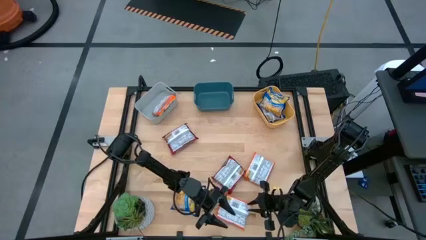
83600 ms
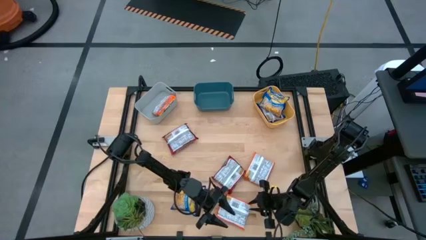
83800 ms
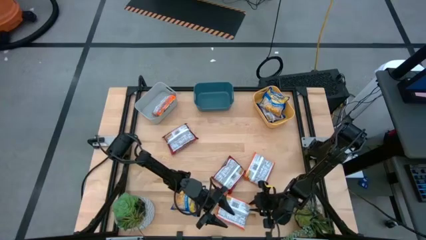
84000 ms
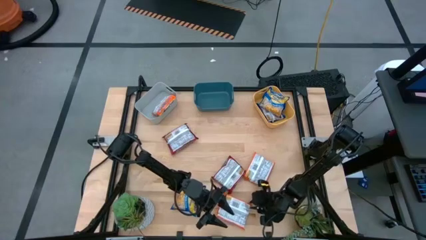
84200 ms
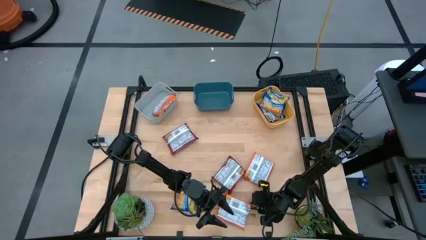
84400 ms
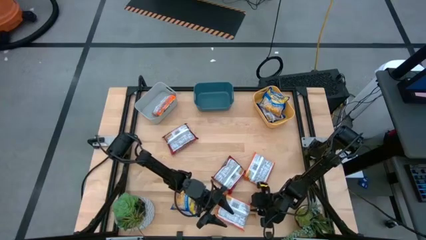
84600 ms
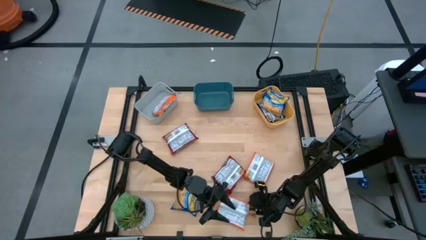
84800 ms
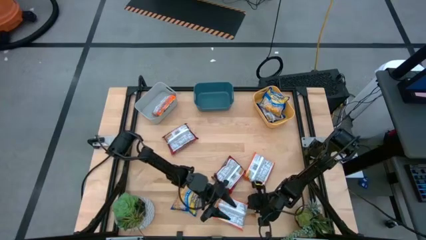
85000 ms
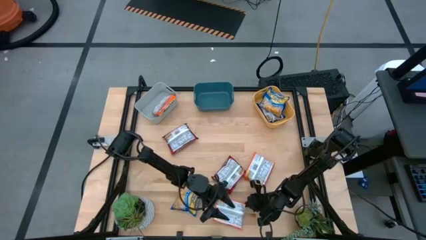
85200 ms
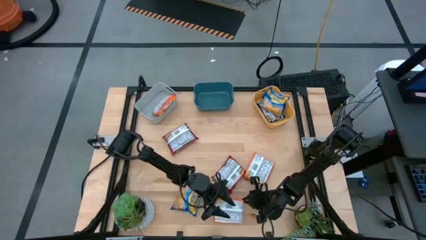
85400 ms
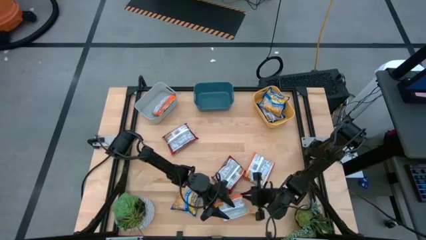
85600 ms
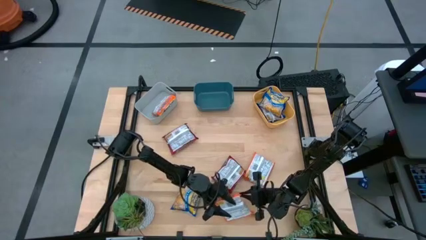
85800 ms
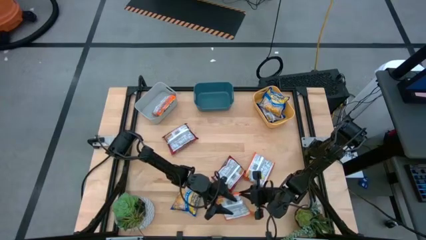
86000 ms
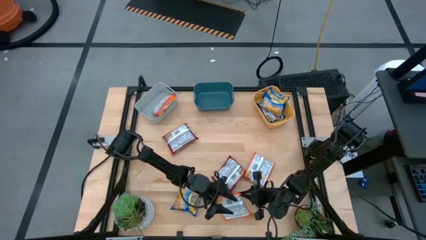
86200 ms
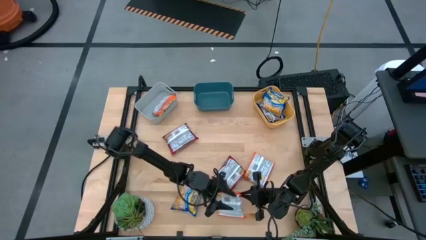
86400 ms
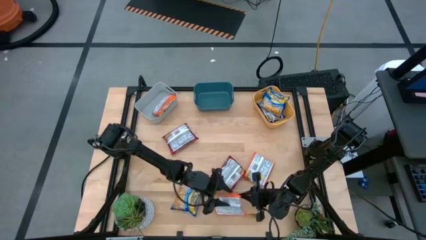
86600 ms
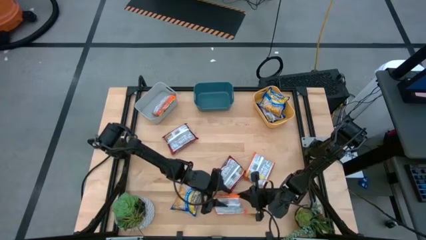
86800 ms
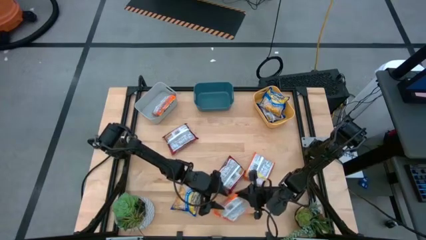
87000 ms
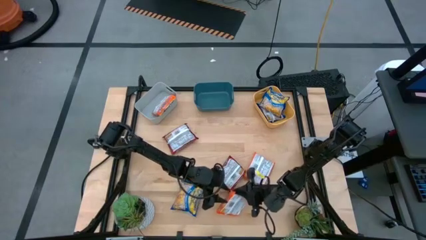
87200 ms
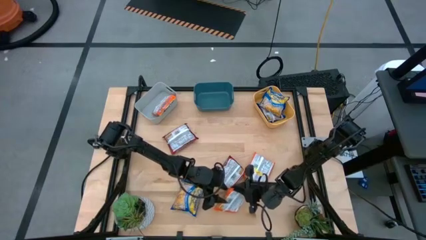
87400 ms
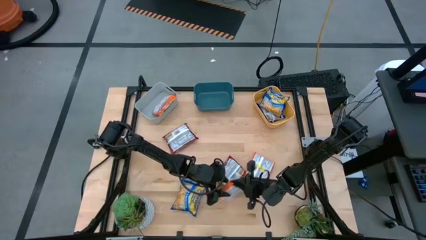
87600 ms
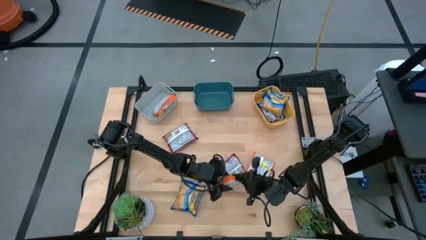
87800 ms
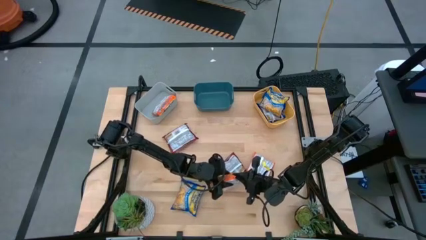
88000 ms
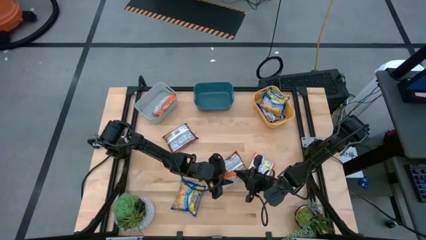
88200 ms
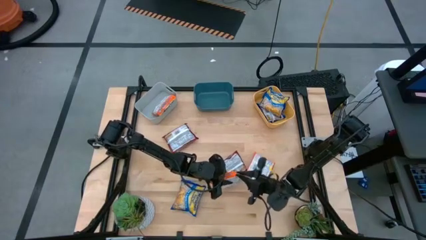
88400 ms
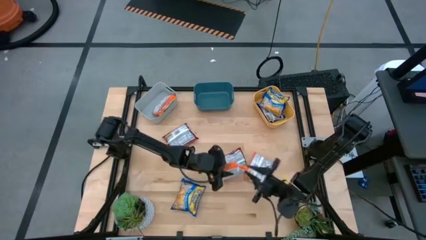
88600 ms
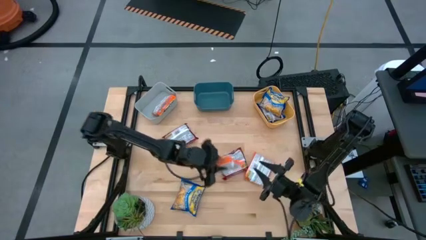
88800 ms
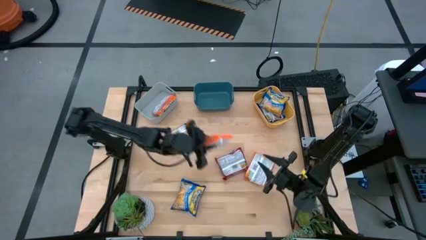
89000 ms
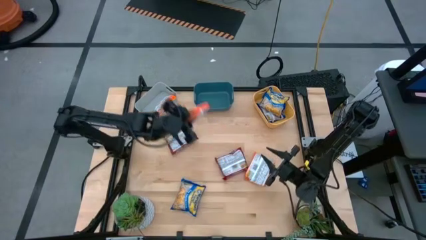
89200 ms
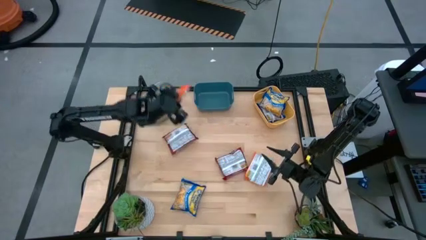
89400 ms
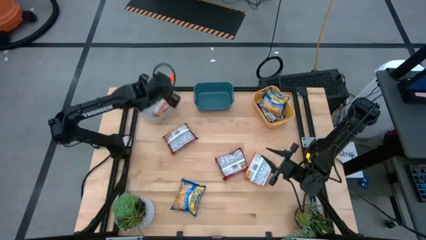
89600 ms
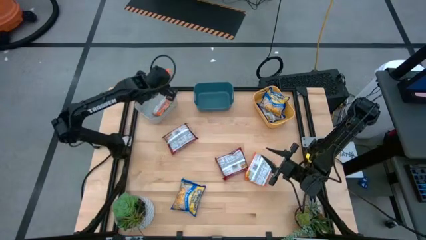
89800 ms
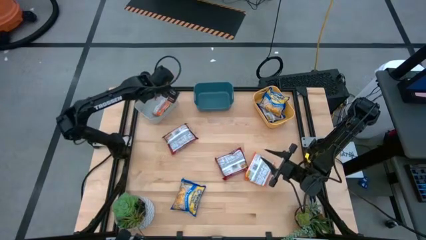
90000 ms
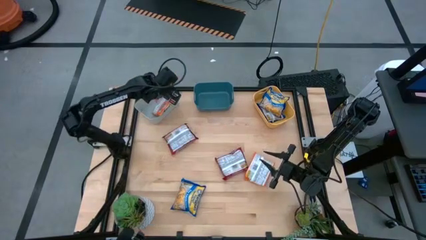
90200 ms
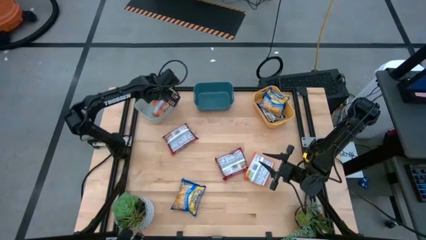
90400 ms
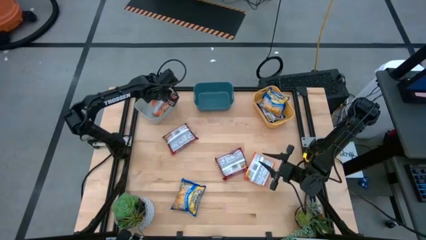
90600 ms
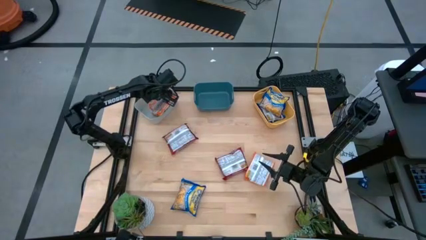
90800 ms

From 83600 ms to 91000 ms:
Task: Sort Maruchan noodles
Put the bottom orange noodle into the gray bin

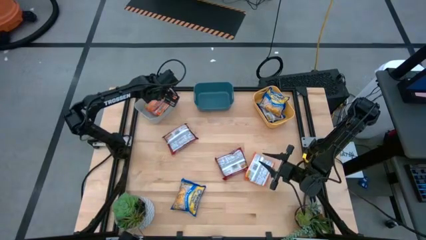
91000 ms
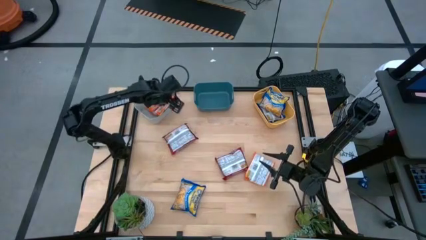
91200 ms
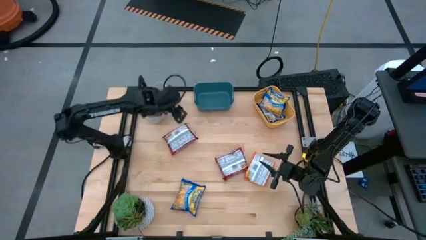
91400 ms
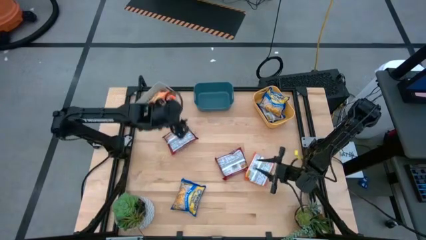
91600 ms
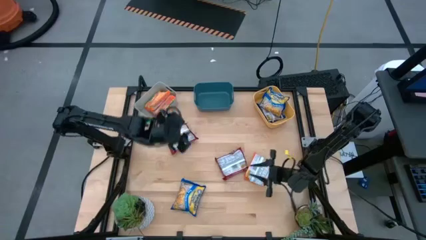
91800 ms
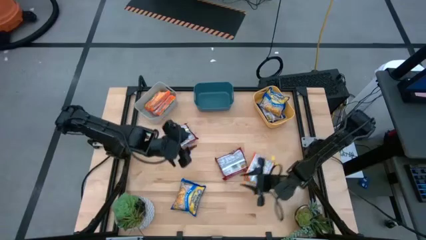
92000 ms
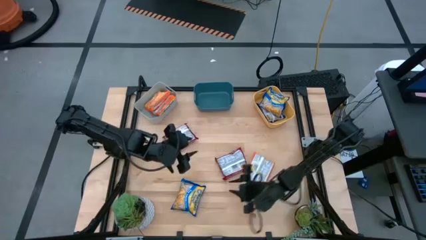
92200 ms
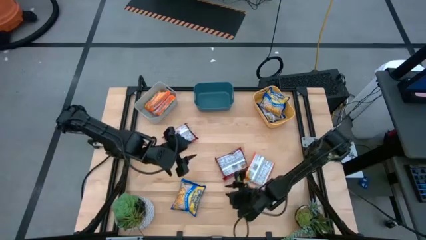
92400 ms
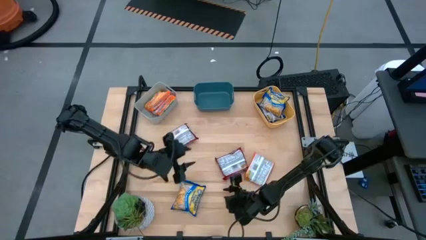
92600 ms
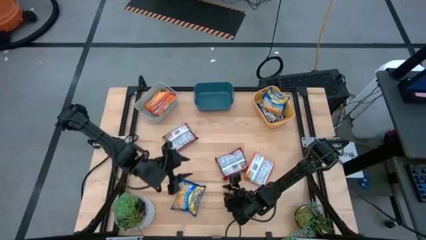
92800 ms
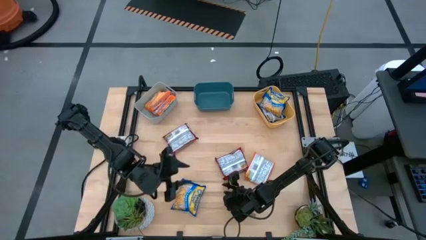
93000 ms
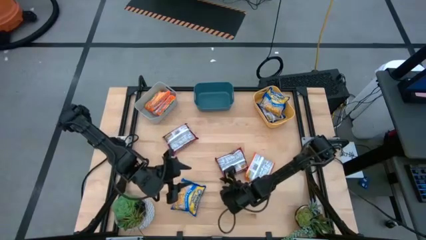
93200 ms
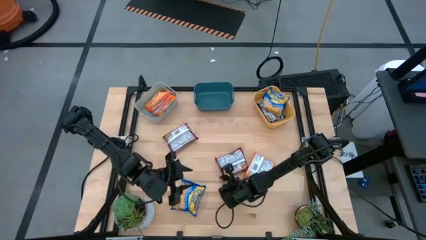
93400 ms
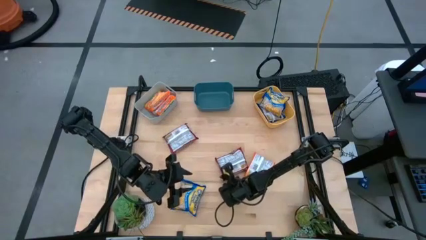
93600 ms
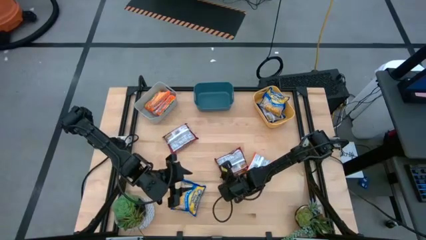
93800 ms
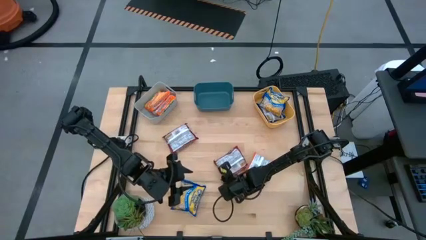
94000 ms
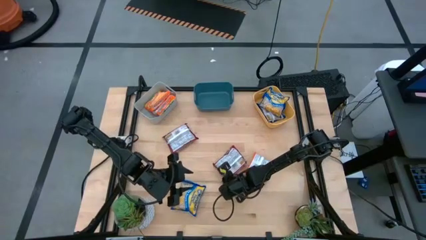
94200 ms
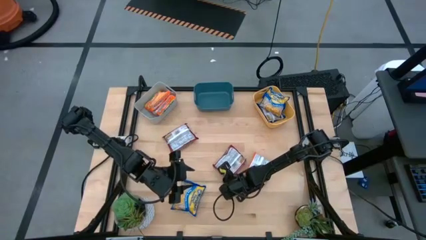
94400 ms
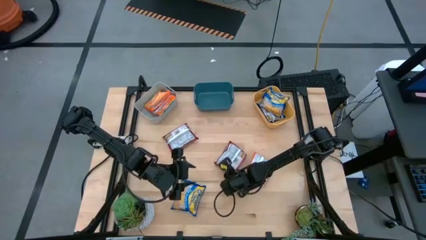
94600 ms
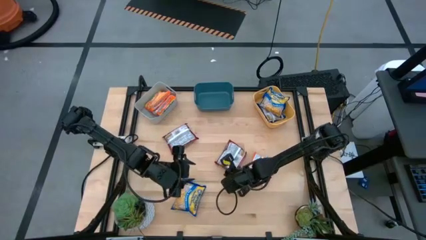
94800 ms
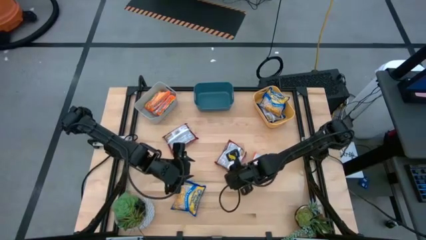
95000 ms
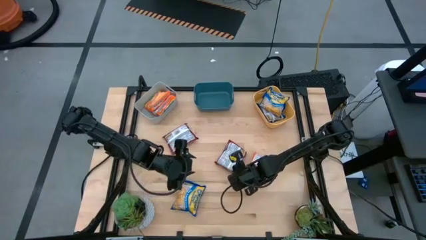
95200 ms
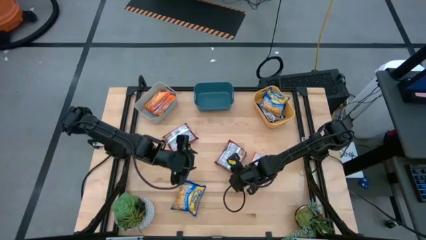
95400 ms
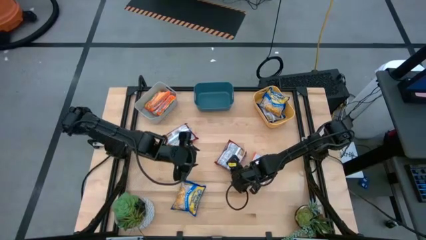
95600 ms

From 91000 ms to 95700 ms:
Put the bottom red noodle pack into the blue bin

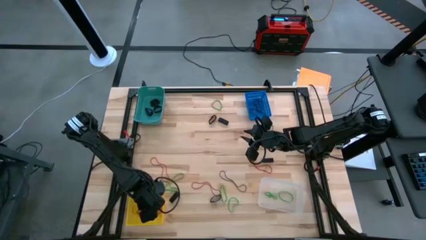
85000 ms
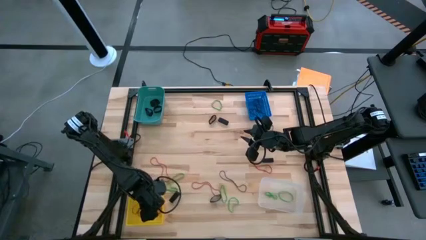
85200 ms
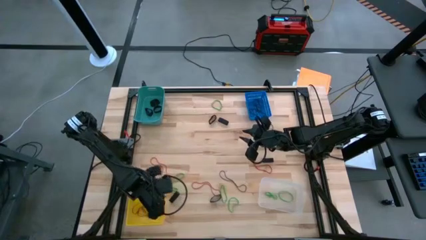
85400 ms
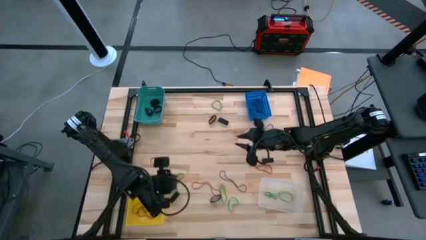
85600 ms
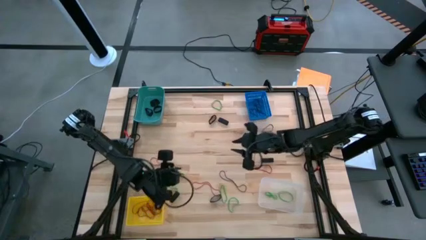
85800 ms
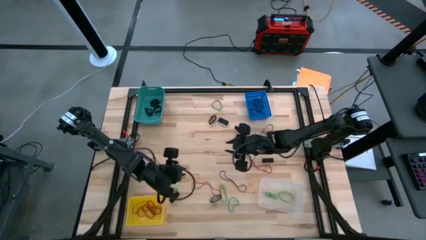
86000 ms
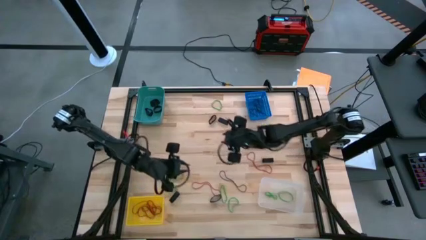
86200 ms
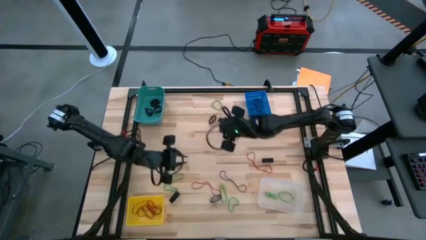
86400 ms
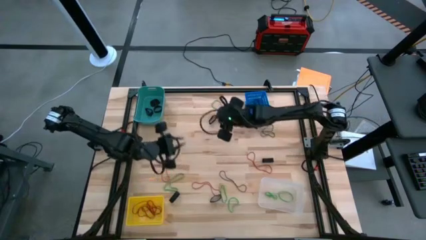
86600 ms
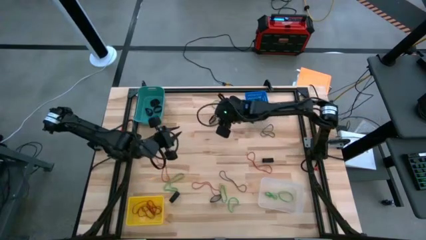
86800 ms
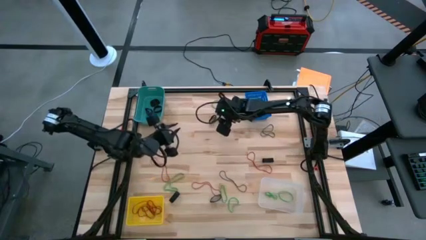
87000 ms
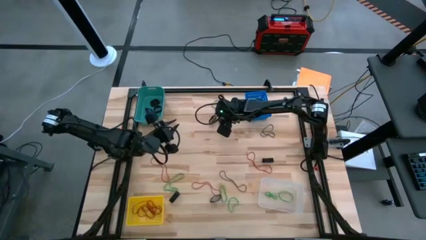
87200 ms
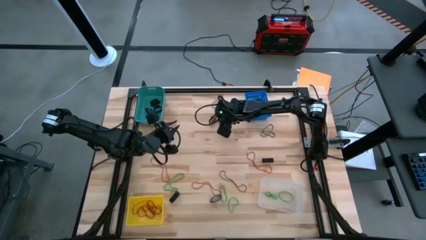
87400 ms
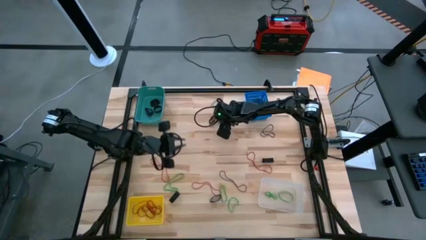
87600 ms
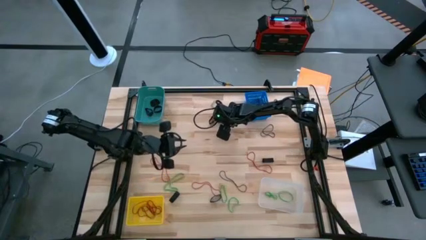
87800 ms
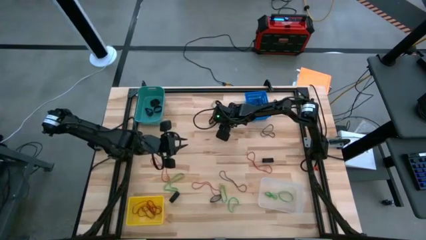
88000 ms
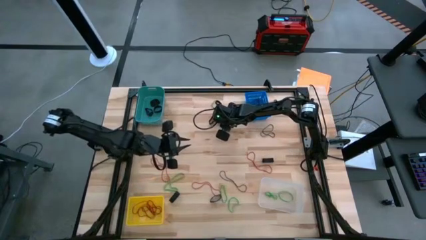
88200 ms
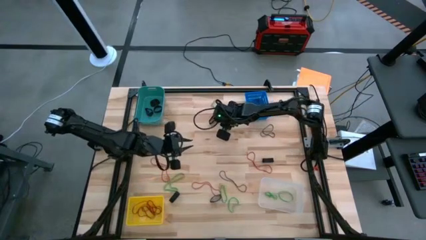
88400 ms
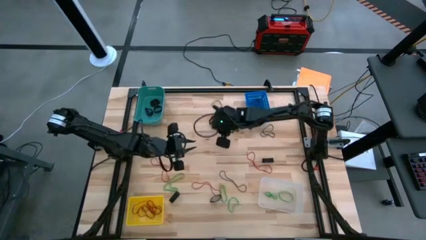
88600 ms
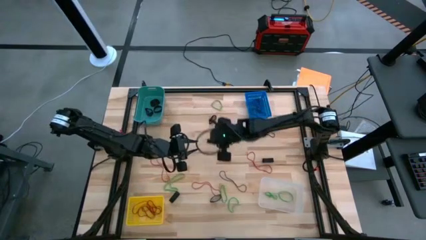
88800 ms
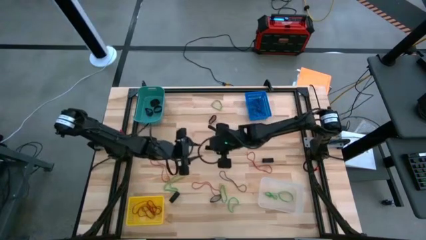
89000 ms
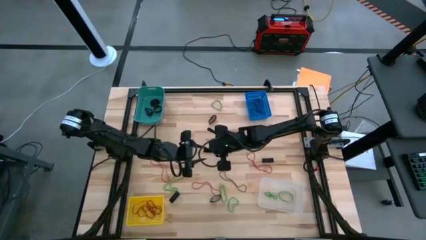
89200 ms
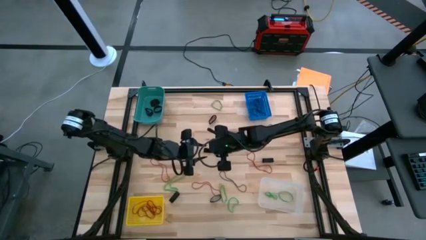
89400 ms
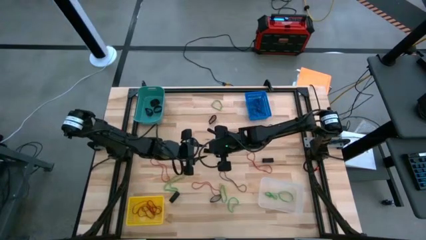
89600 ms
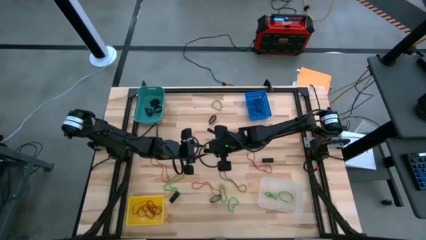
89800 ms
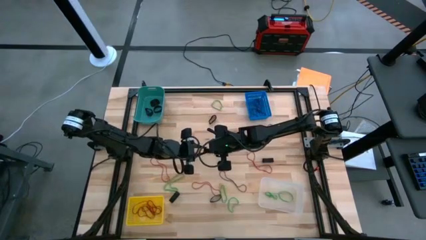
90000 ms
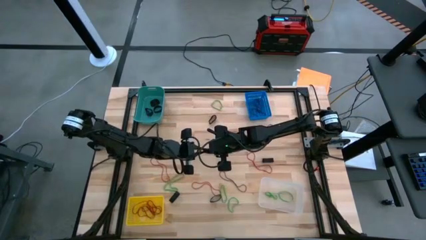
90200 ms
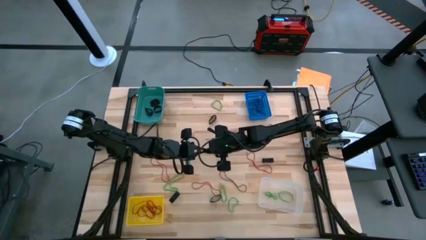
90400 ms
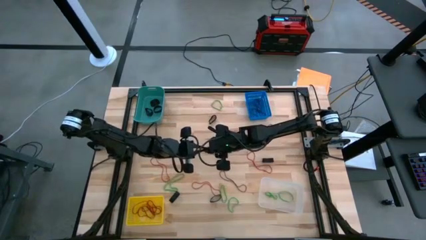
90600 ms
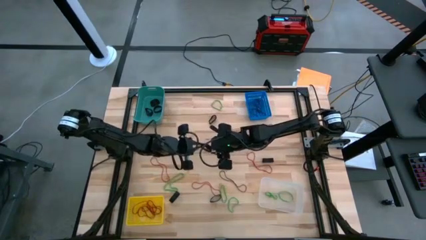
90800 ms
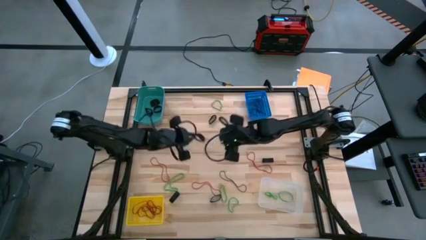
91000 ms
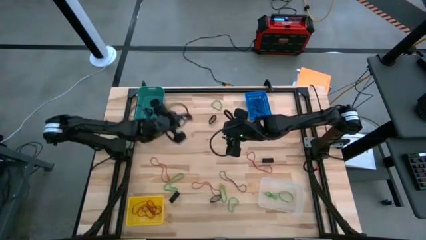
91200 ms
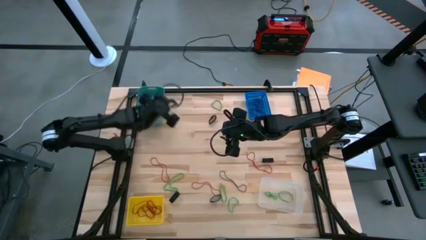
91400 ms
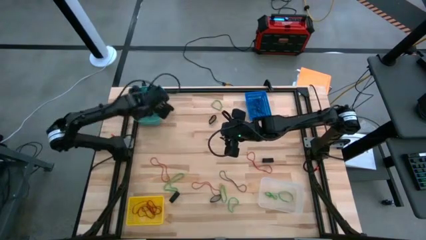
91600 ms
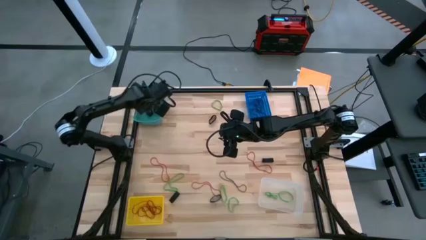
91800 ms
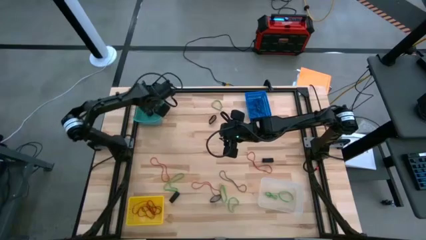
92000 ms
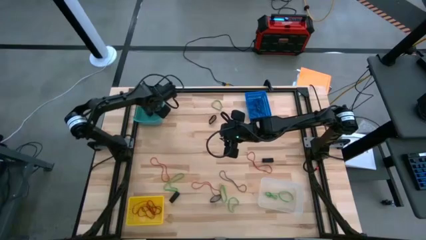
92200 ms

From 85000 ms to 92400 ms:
Task: Sort rubber bands into baskets
Put the thick black rubber band into the light blue bin
